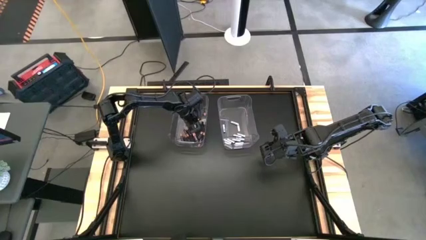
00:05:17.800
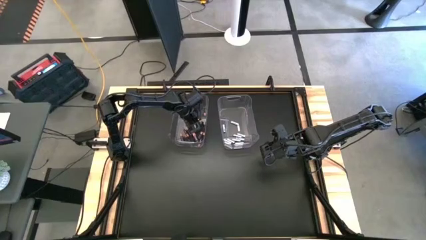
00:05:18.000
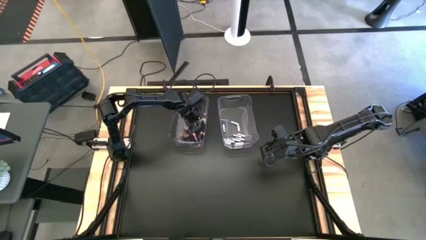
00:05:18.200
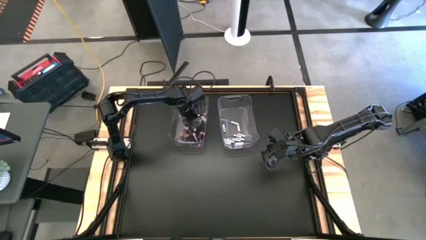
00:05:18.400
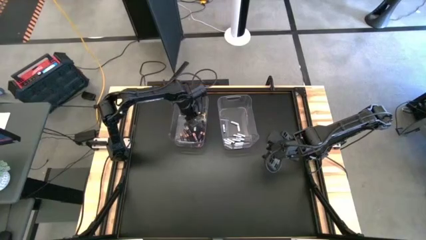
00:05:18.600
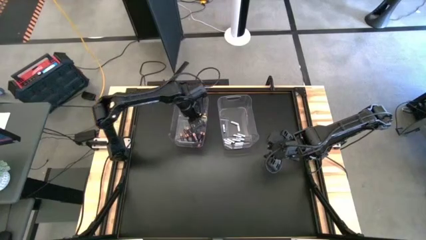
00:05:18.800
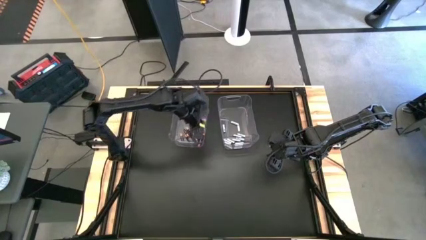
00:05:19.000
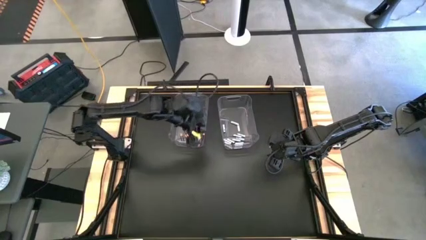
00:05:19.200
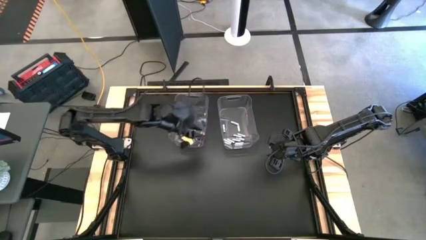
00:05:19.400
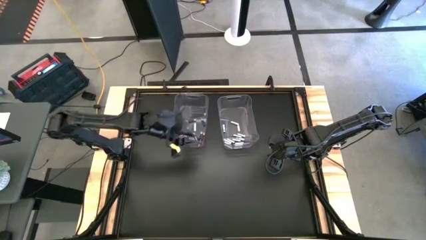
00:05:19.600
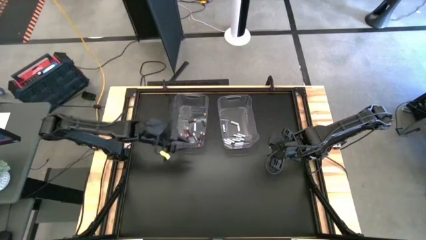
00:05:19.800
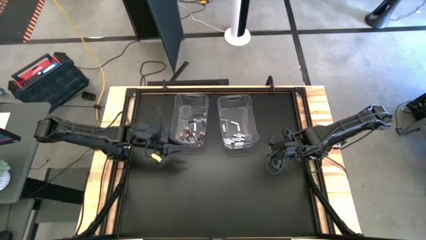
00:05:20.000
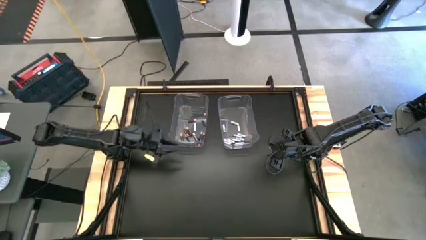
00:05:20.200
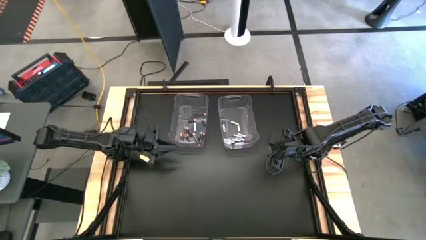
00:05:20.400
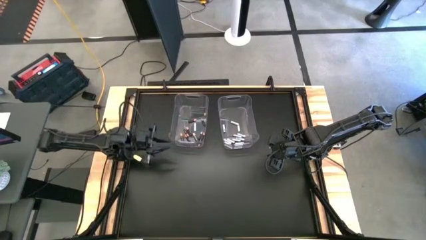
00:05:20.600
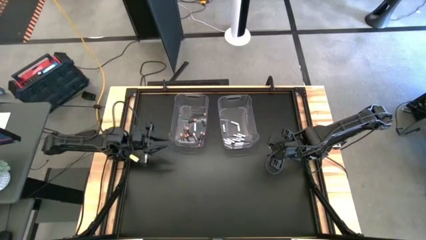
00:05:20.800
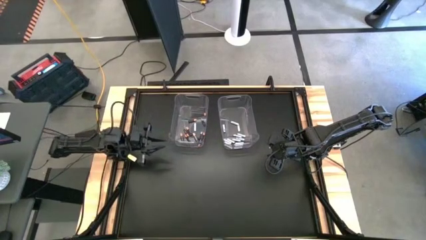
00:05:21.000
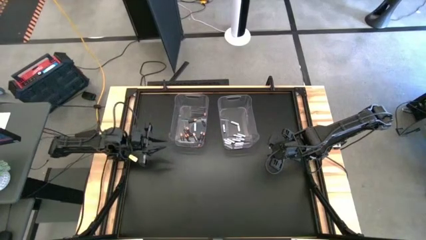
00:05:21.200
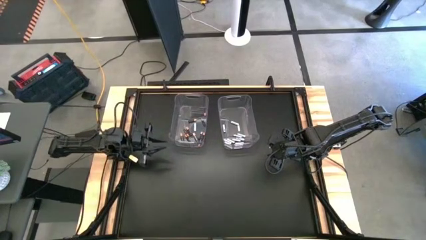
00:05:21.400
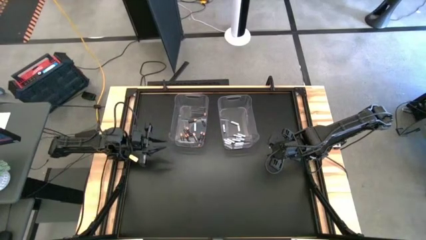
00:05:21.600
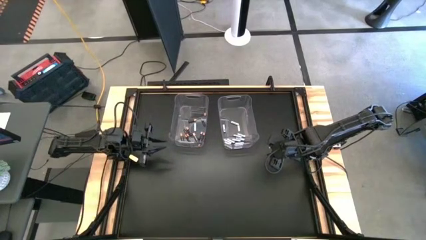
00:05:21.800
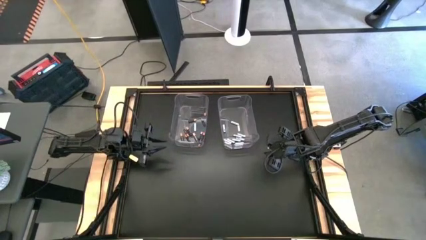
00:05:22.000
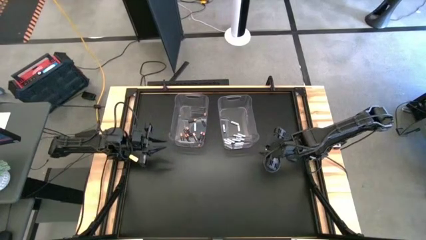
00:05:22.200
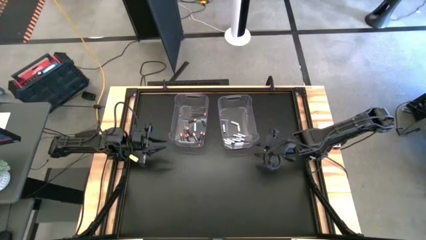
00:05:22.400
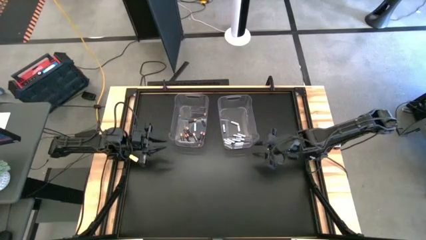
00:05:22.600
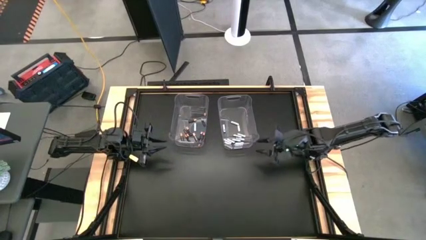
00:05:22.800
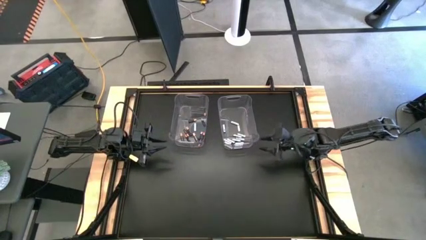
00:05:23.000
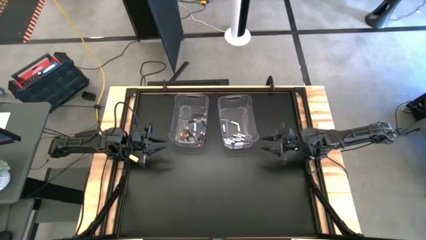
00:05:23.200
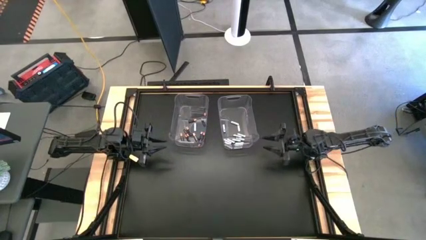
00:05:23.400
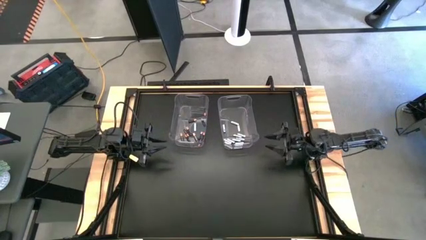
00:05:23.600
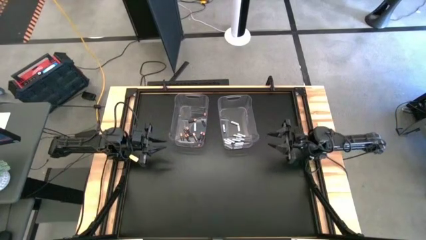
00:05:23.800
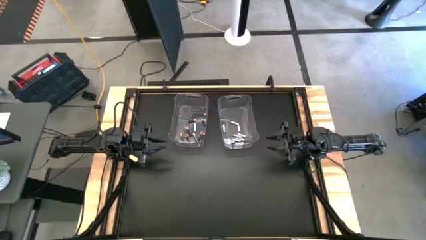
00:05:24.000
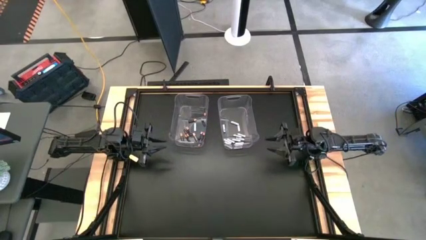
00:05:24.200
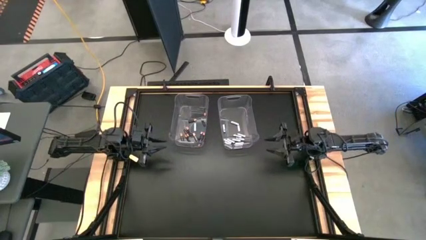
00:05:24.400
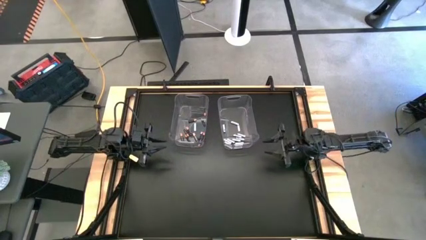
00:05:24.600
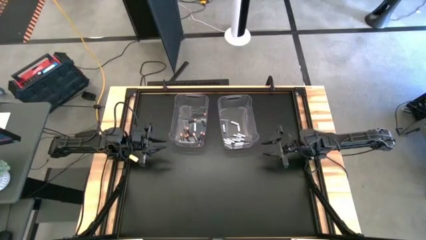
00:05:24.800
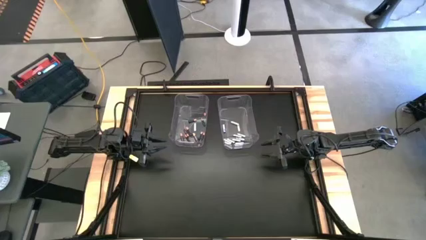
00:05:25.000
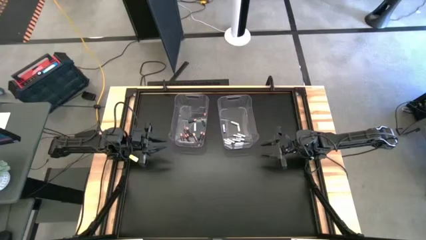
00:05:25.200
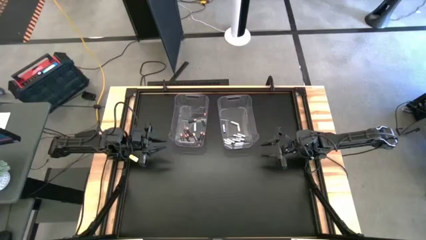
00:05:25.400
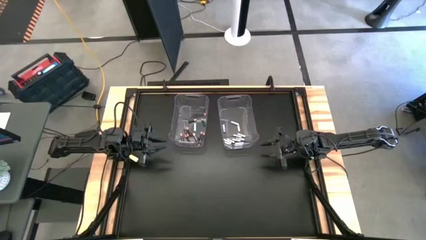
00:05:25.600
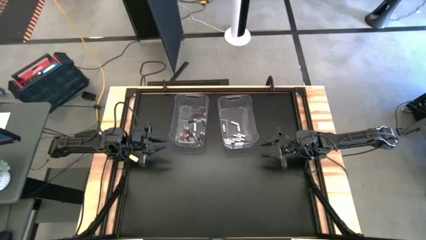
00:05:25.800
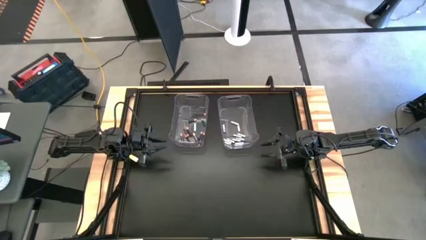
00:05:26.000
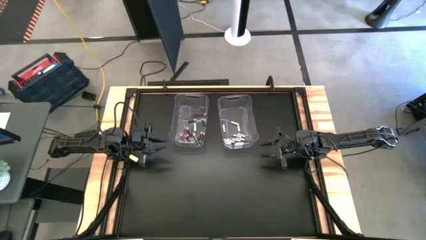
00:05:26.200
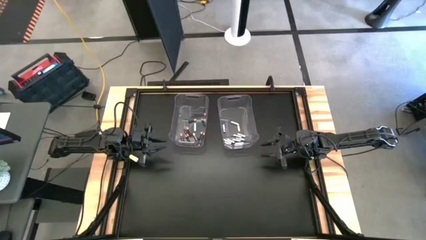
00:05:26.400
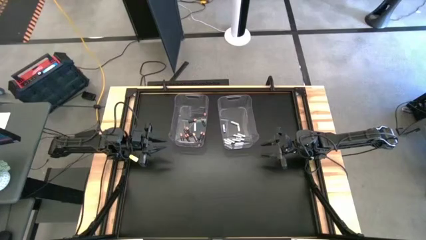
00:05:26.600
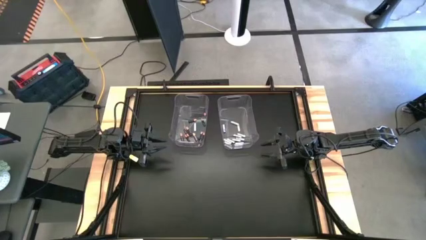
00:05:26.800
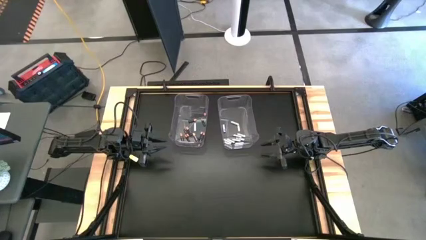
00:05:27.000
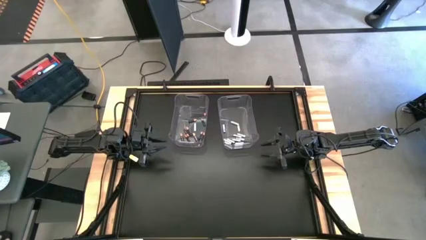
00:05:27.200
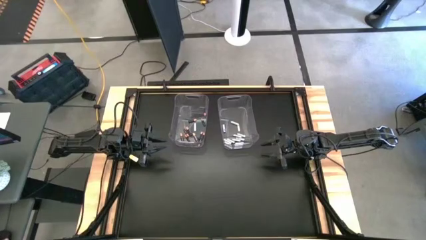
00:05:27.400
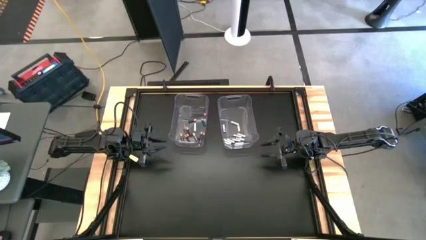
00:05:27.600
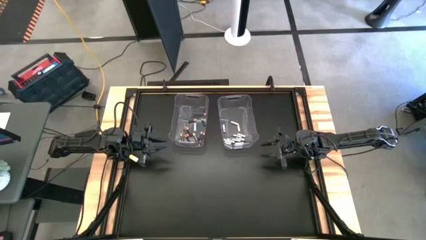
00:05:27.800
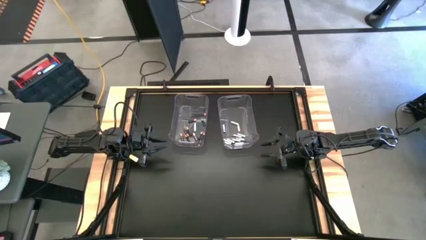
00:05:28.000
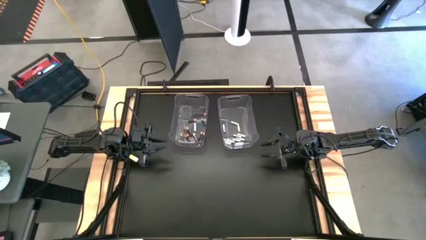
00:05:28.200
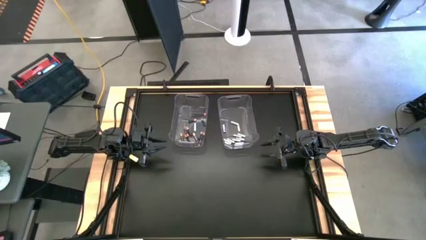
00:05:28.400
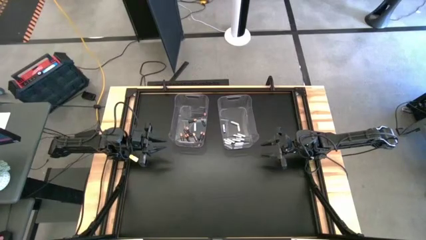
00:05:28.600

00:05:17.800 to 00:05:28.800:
Task: Sort batteries
Return to Home Position

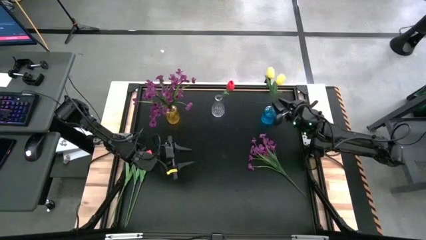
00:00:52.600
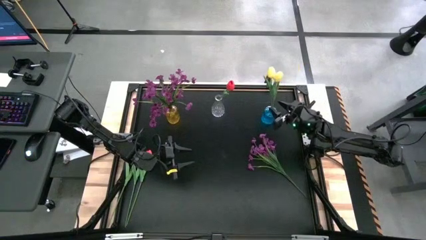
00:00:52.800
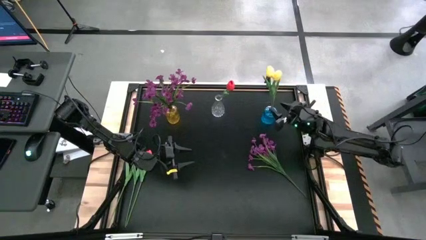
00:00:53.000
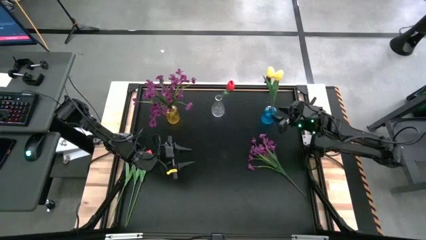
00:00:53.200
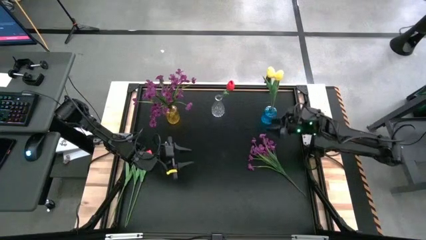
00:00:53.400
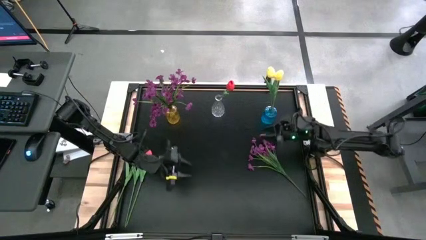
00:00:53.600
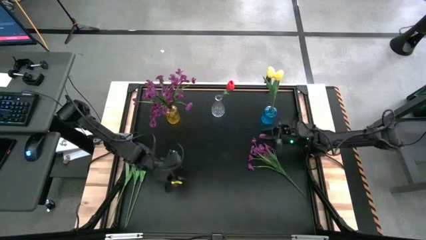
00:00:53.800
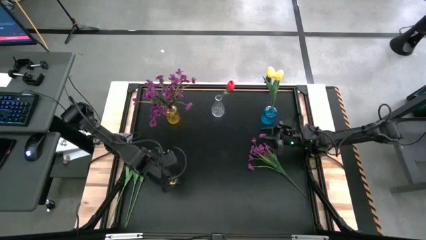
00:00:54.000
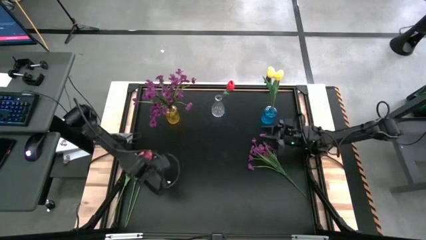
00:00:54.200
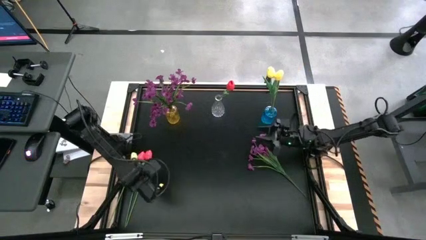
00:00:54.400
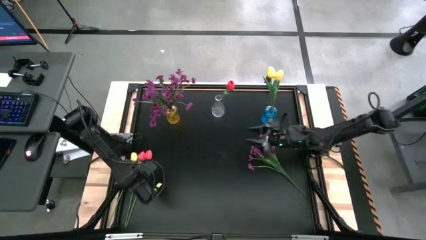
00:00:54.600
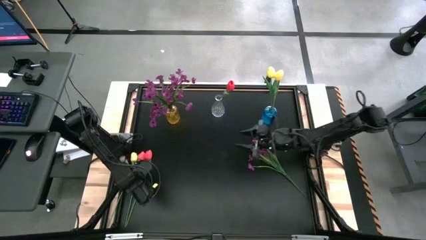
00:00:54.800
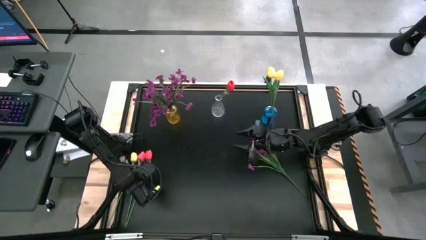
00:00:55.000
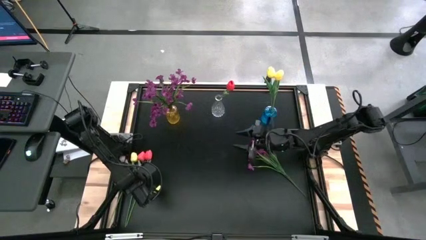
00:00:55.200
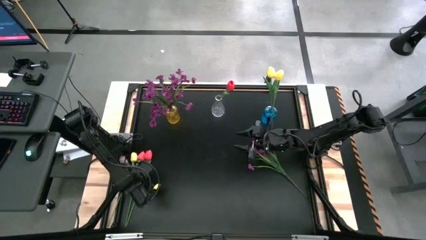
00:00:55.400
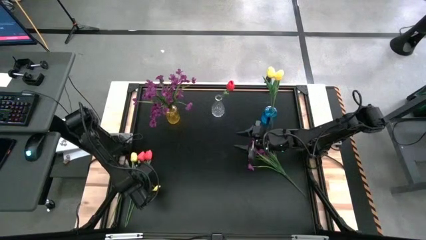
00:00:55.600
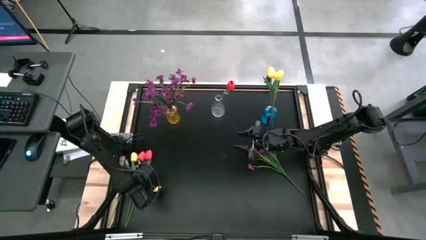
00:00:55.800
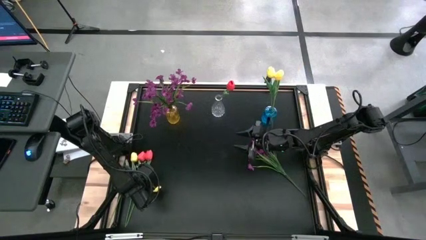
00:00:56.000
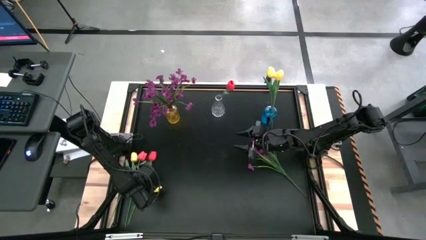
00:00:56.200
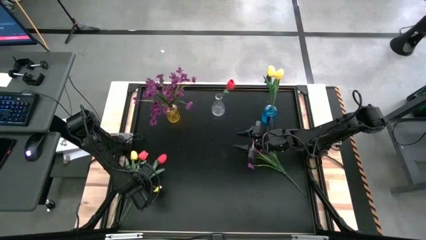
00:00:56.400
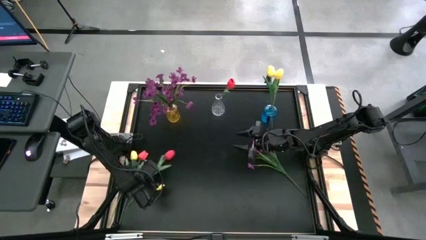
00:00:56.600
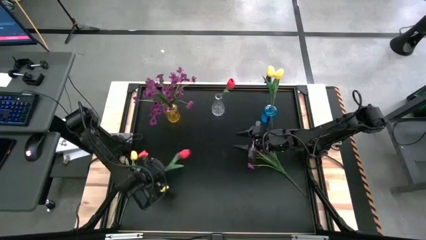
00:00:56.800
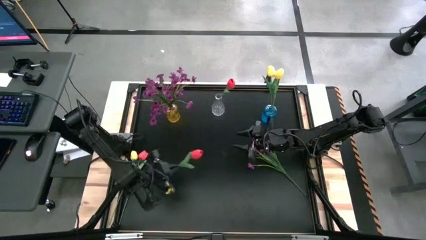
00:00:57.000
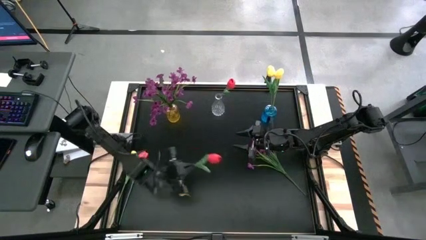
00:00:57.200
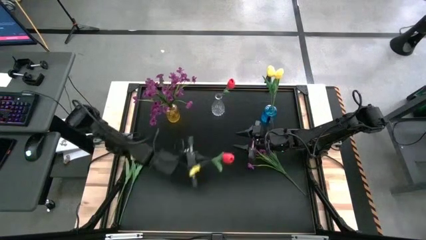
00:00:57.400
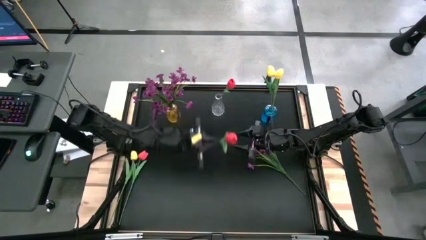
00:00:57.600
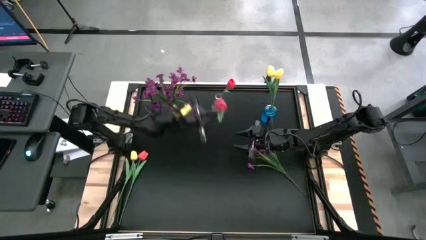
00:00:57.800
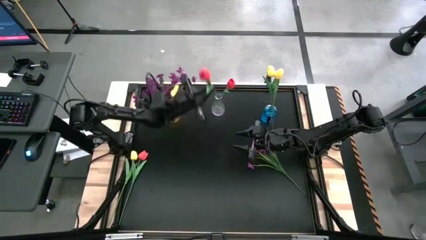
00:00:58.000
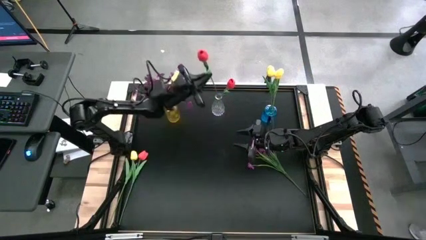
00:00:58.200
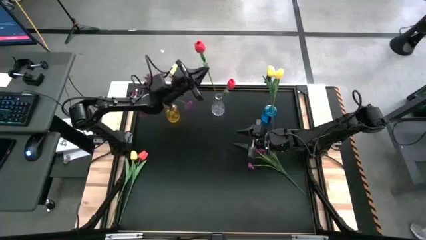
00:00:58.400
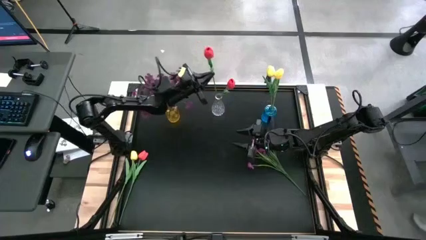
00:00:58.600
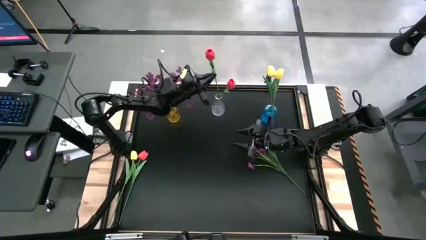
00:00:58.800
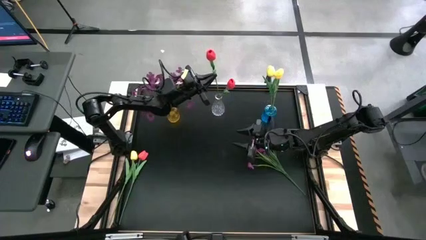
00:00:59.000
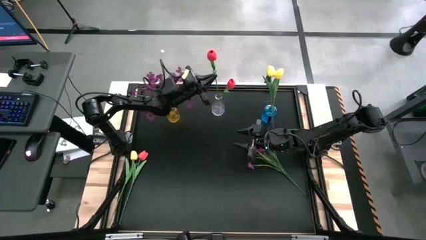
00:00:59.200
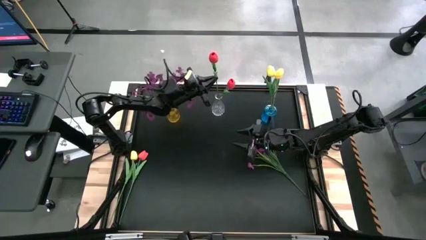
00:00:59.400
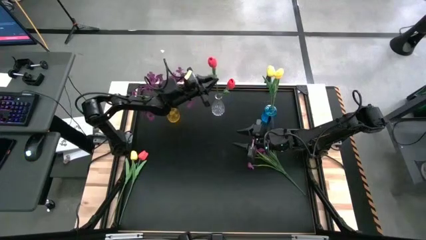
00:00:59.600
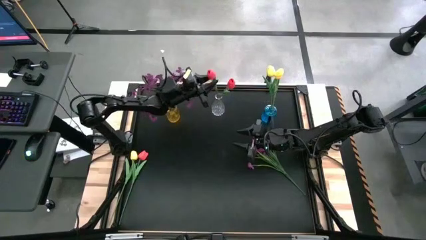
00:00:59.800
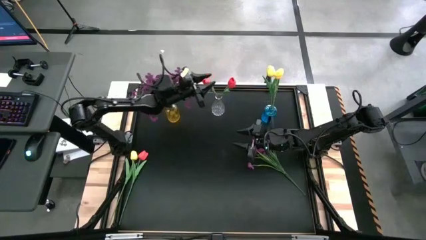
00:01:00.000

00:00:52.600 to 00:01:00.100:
Task: Sort flowers into vase by color
Put the right red flower into the transparent flower vase
